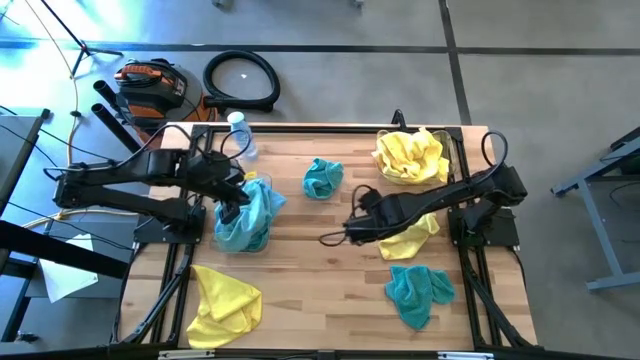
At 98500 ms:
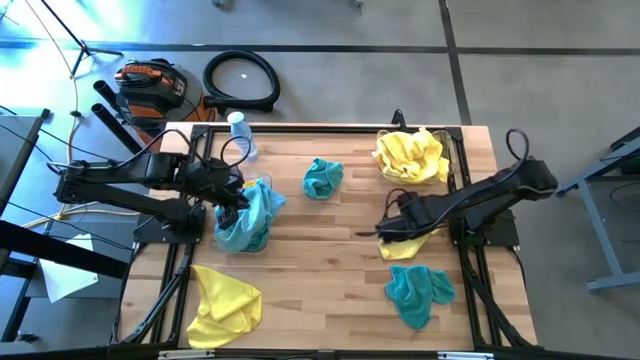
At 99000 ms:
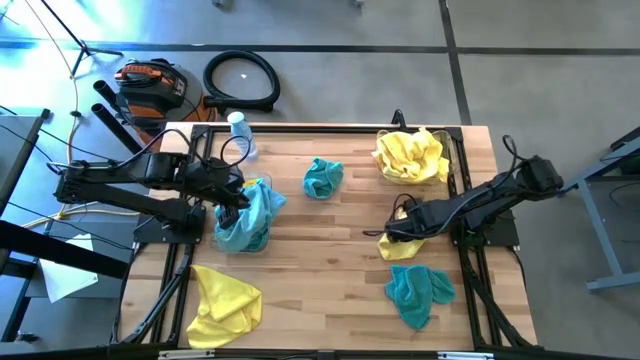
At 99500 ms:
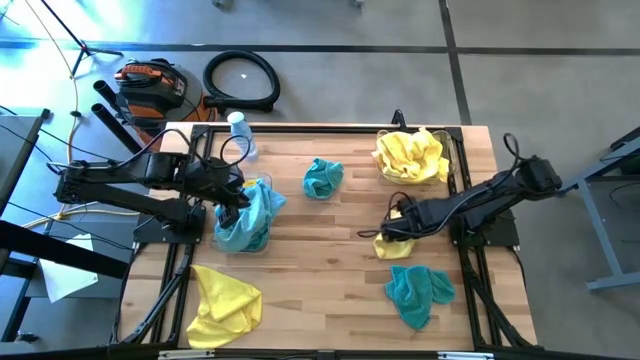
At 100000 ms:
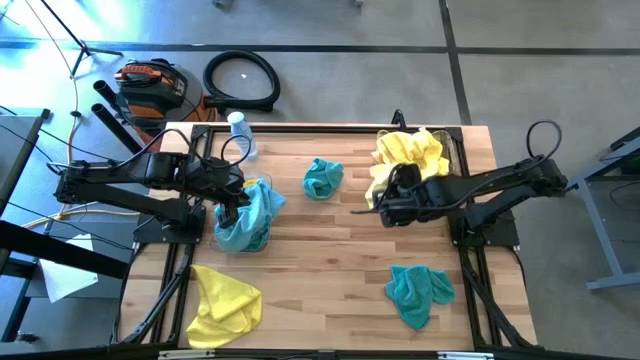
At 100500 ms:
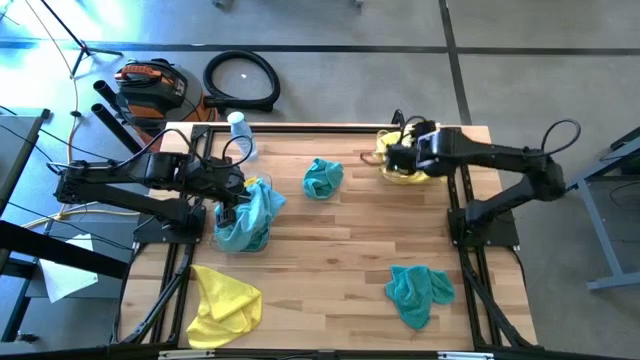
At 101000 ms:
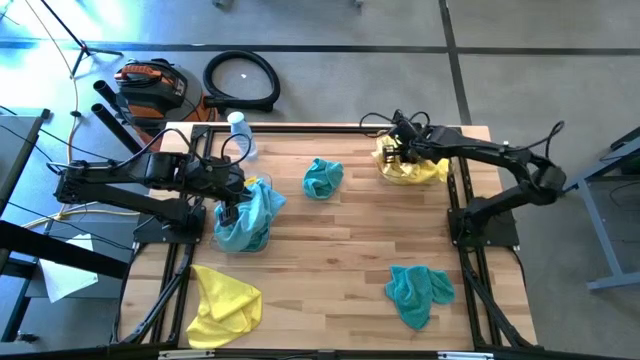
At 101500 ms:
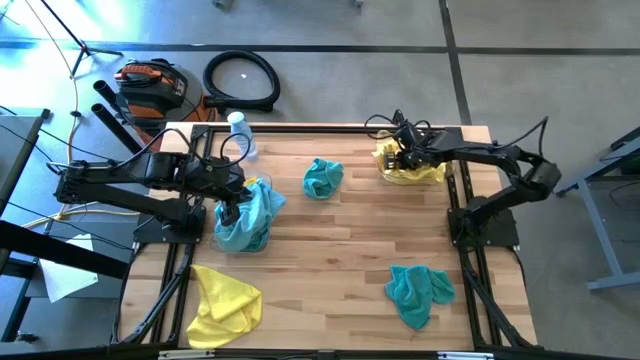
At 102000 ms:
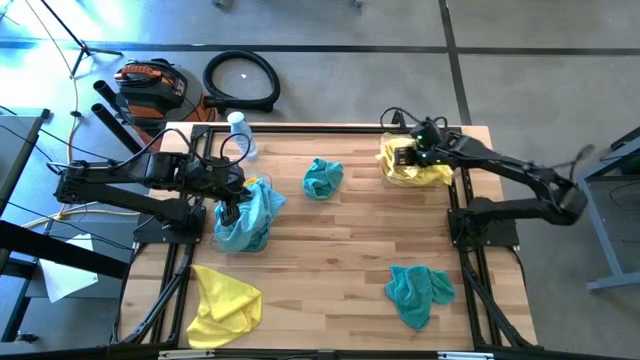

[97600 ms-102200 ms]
Task: Sort microfiber towel by color & place in baskets
Put the yellow microfiber cloth into the right transparent bin

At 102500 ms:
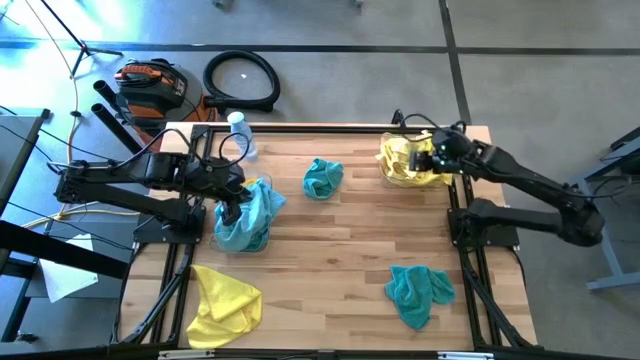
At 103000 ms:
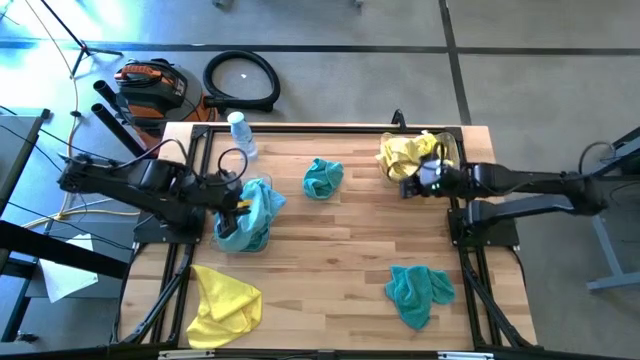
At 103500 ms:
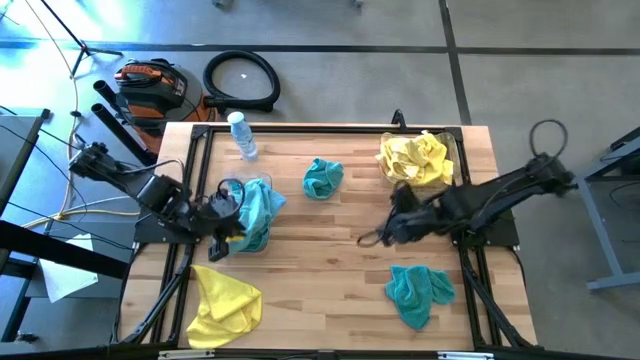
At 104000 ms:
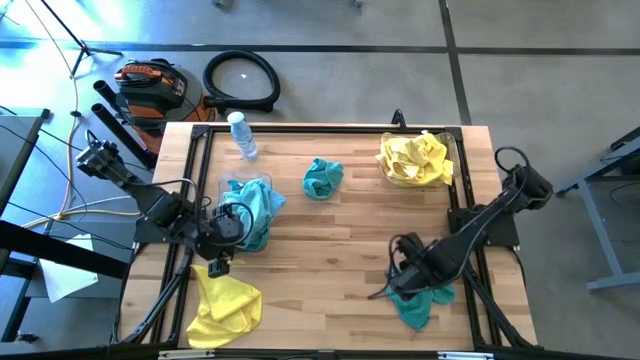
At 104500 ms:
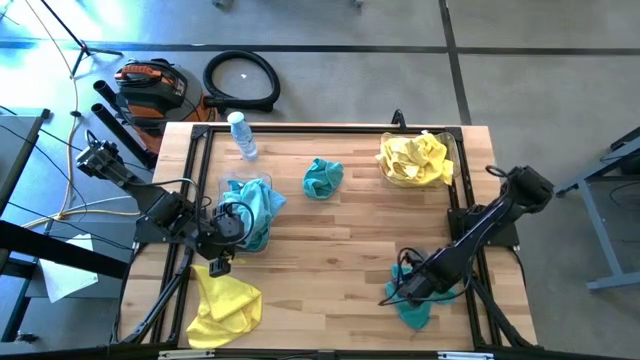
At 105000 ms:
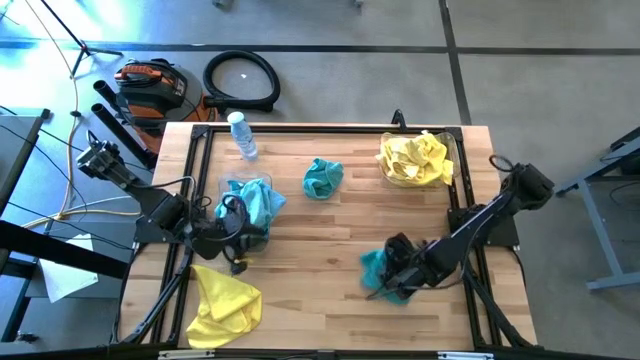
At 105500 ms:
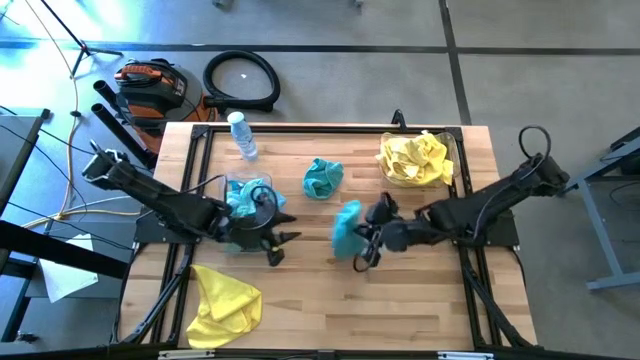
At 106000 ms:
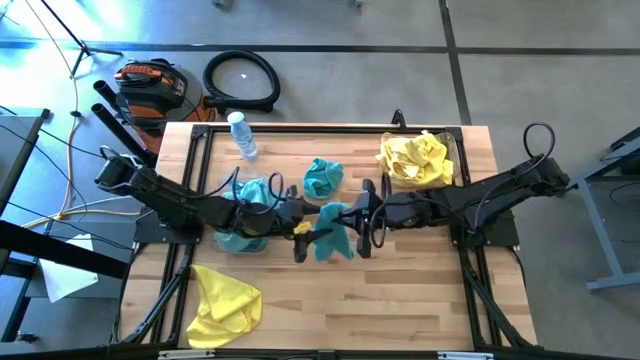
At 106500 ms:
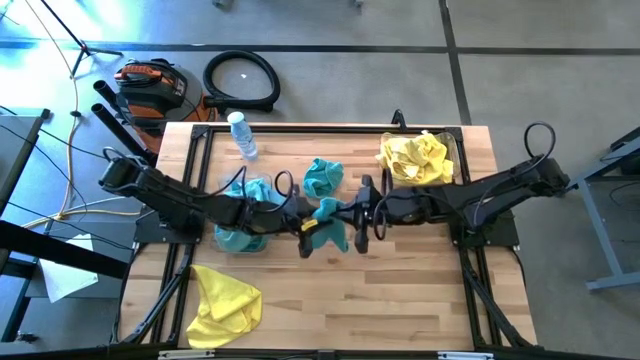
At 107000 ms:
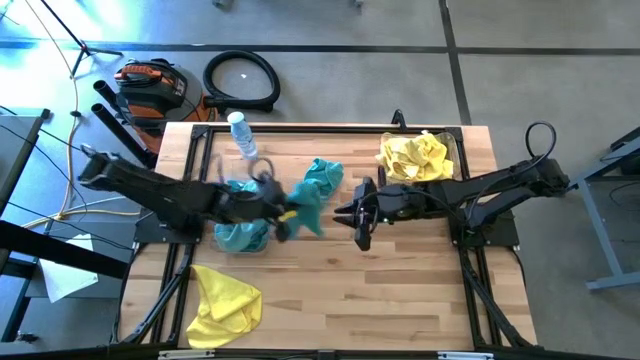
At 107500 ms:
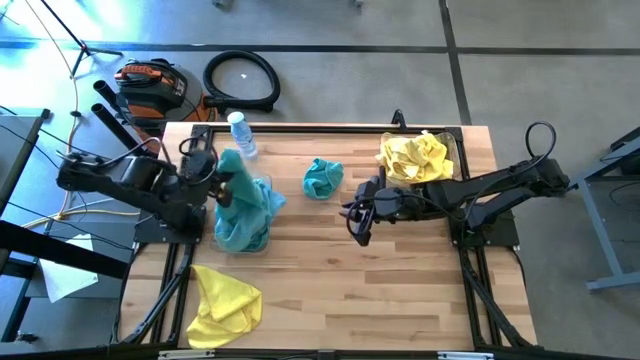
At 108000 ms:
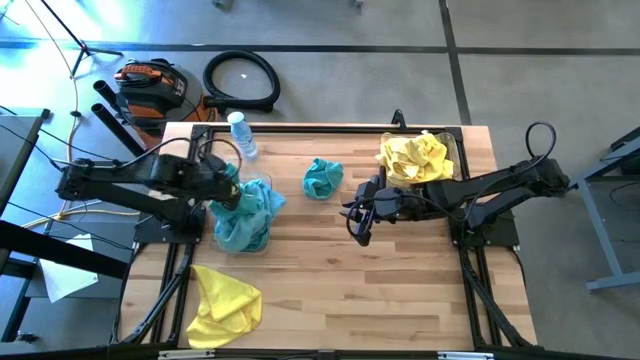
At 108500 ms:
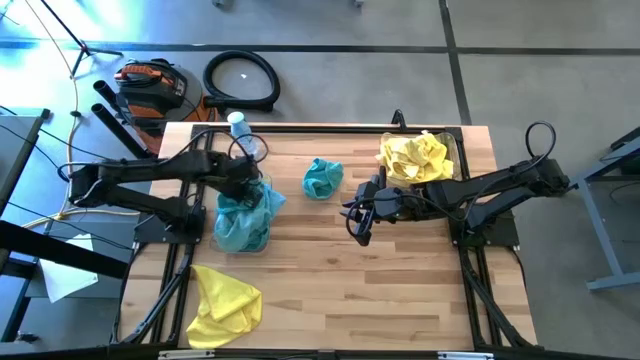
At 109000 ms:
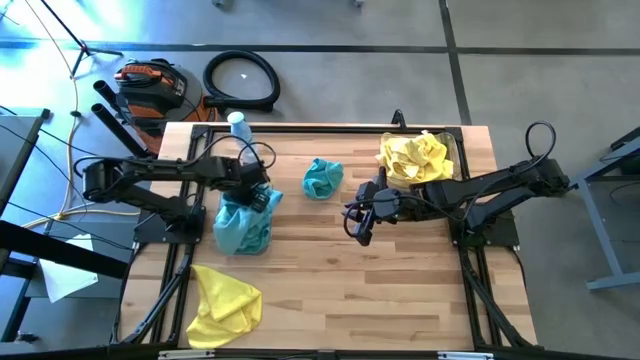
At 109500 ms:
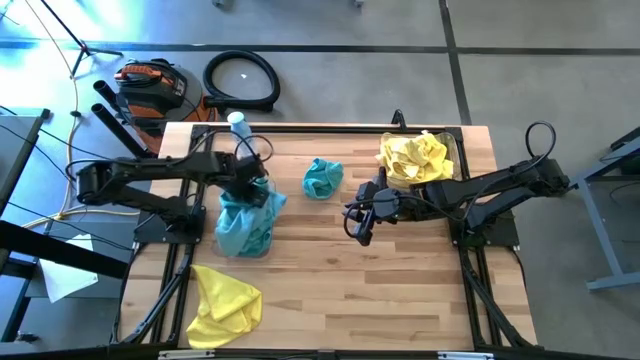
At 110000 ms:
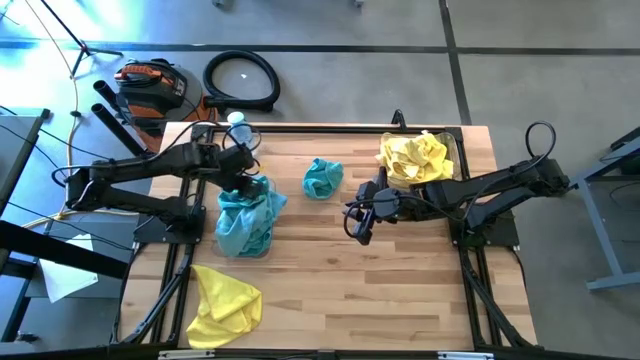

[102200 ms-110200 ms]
Put the blue microfiber cloth into the left transparent bin

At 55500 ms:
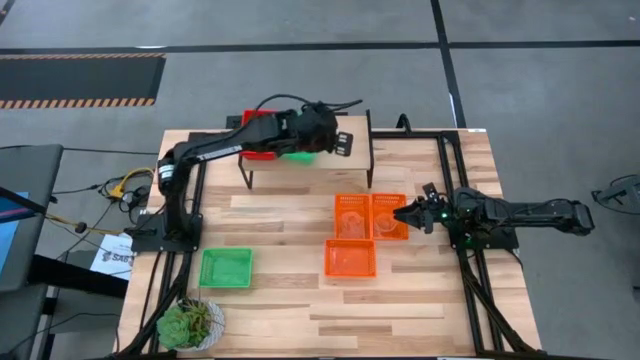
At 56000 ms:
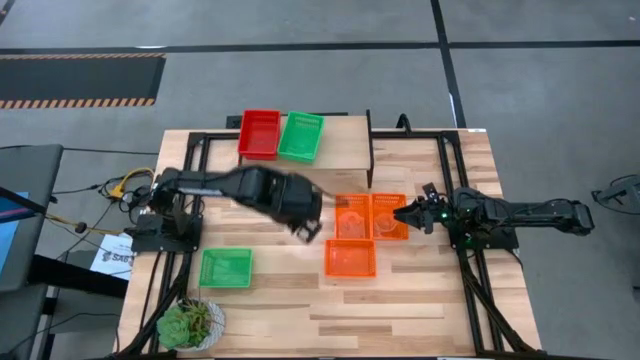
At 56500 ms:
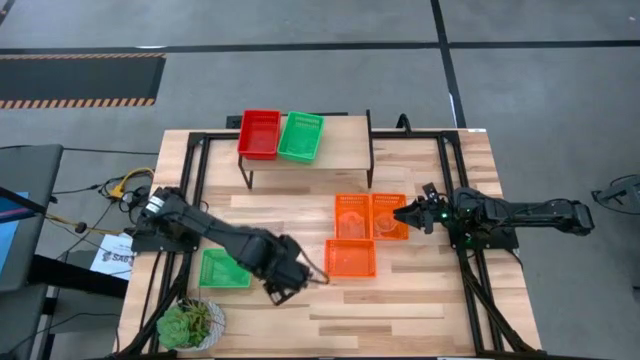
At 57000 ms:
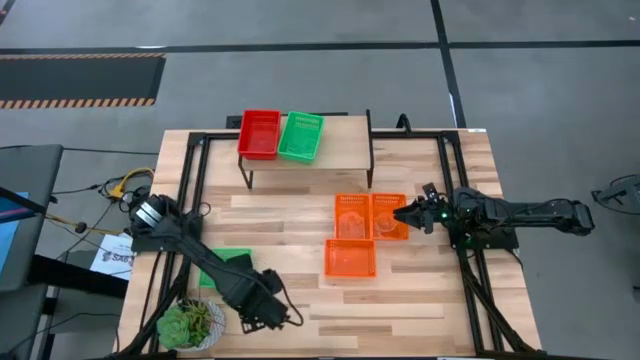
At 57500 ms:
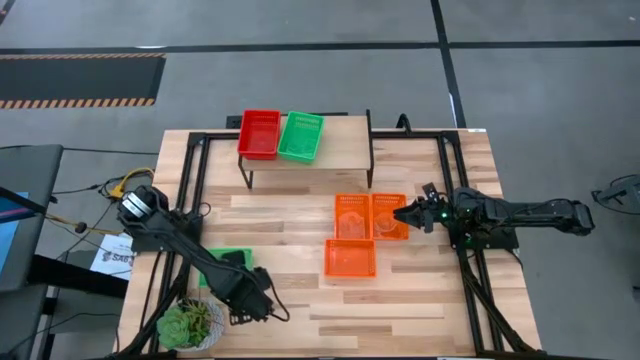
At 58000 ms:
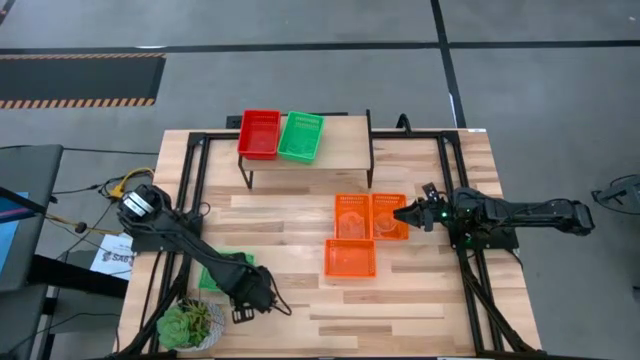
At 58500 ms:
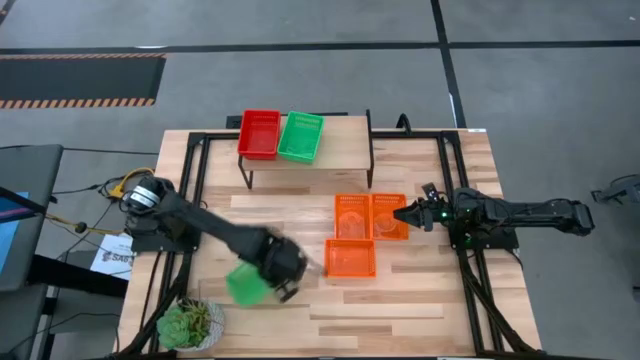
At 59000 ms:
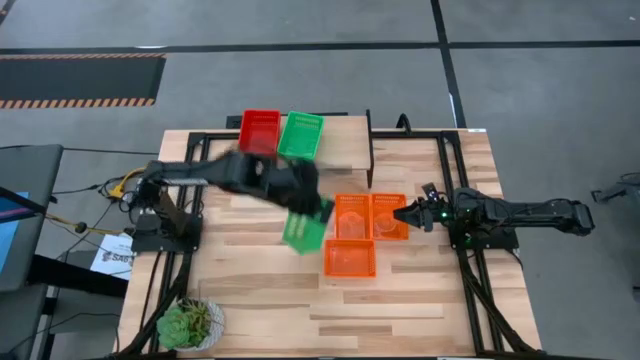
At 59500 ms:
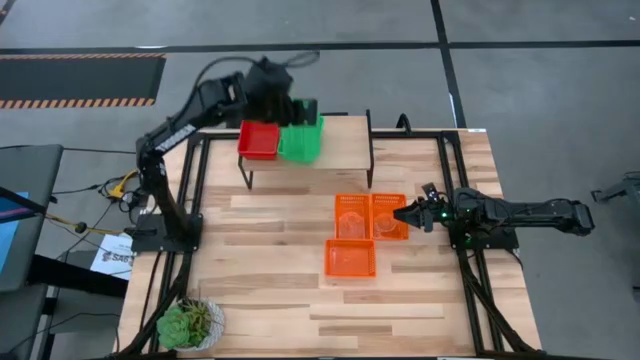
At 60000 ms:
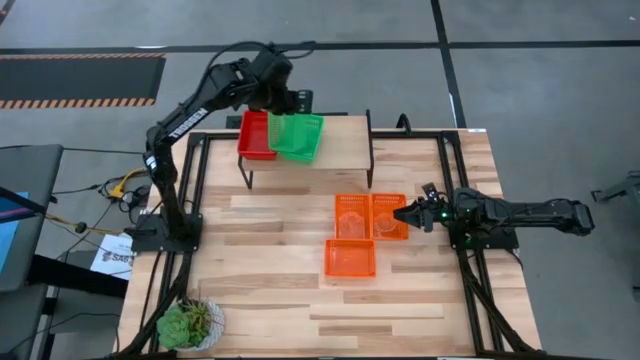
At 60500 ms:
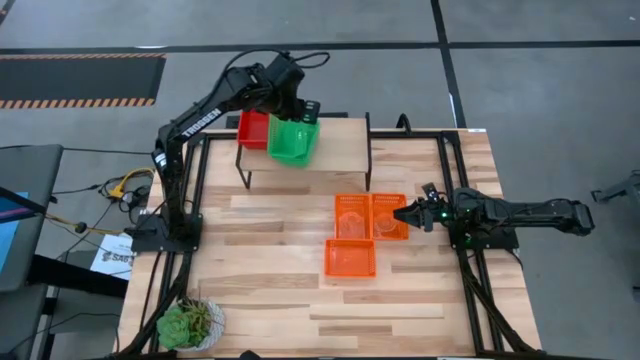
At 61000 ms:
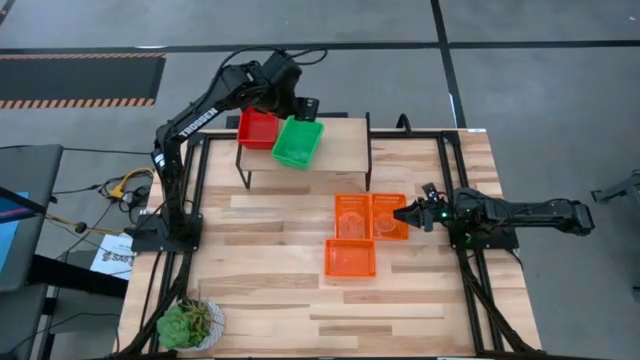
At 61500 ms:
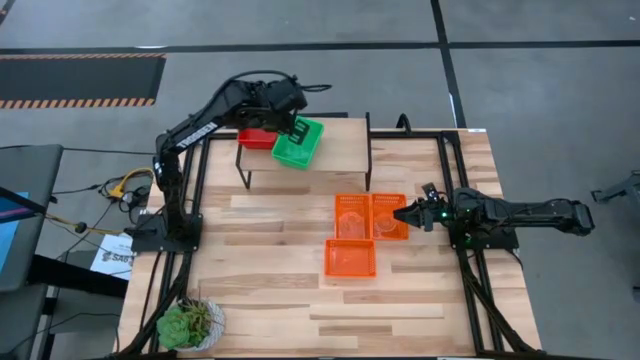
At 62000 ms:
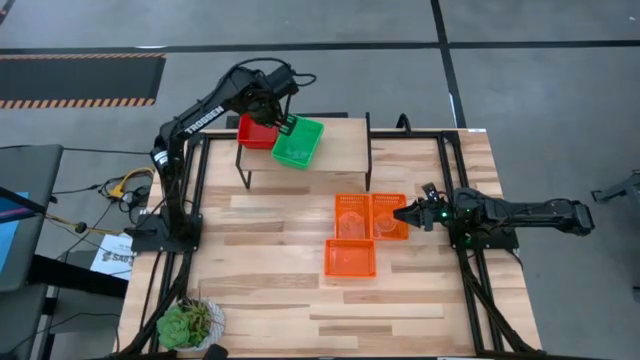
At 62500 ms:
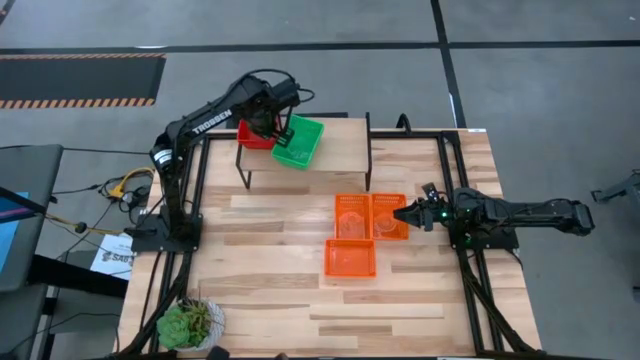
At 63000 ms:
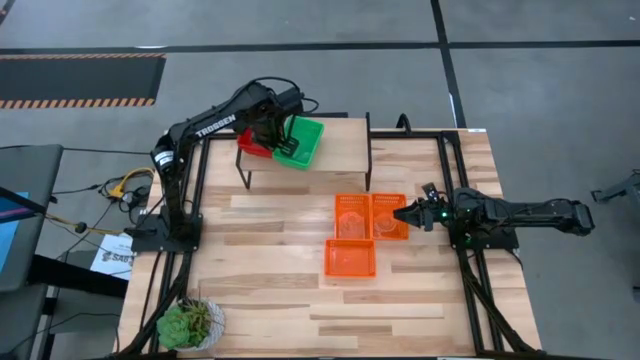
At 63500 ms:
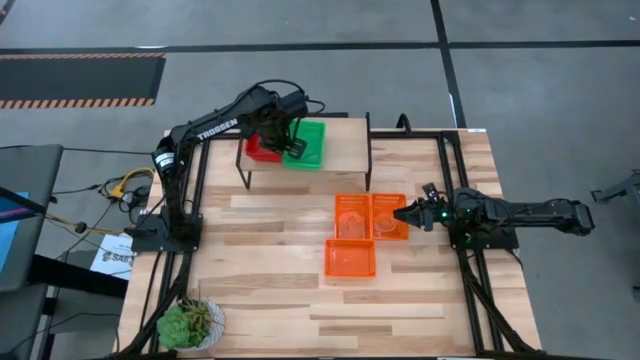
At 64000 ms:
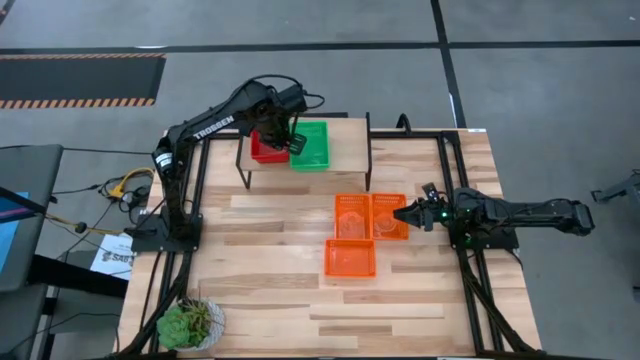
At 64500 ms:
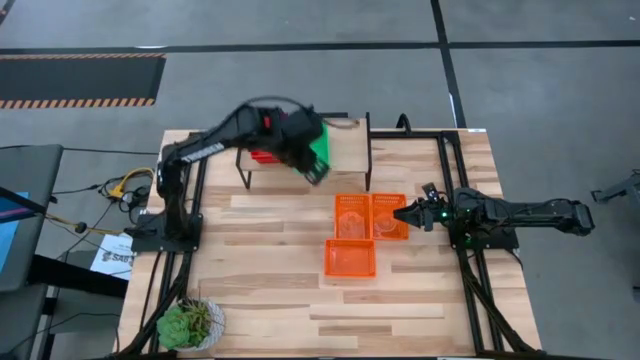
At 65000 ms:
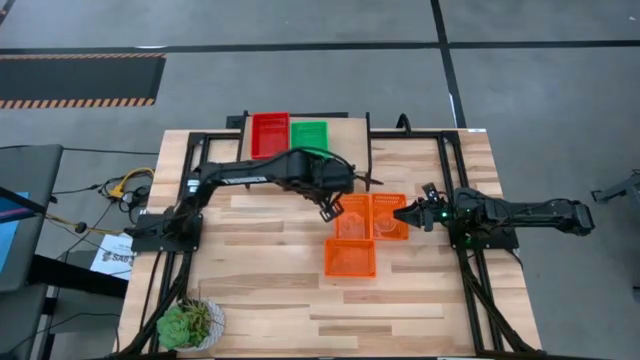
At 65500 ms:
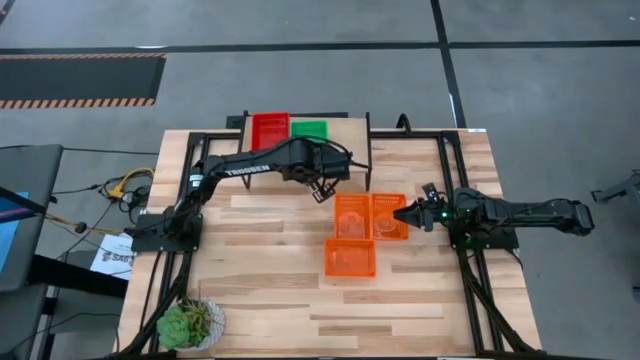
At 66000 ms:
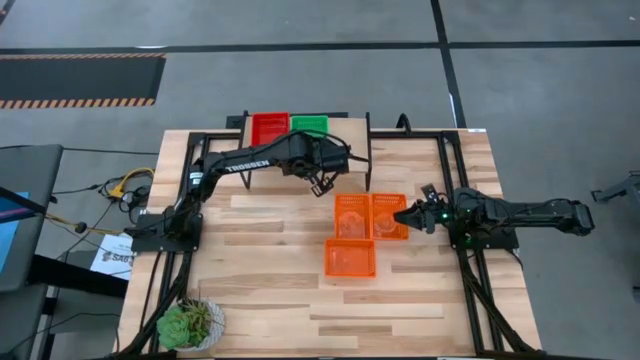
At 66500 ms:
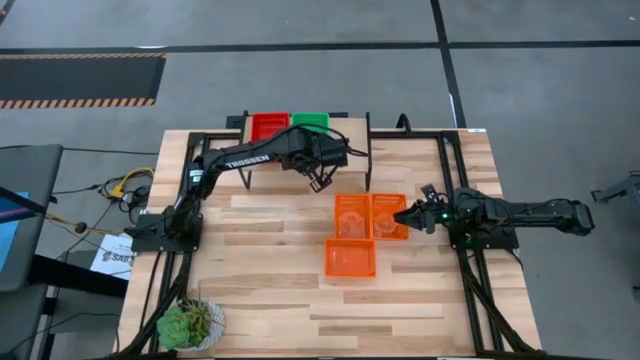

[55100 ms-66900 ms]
Task: Stack baskets on shelf by color
Stack the green bin on top of the green bin on the shelf
